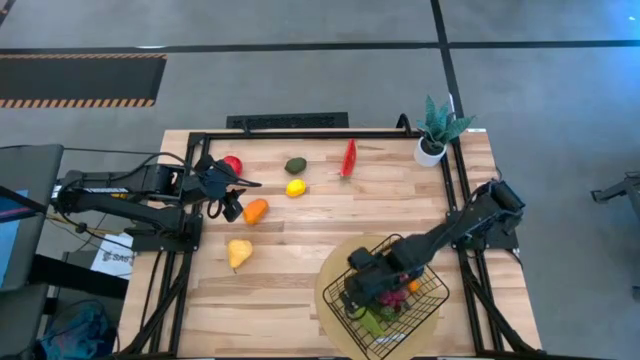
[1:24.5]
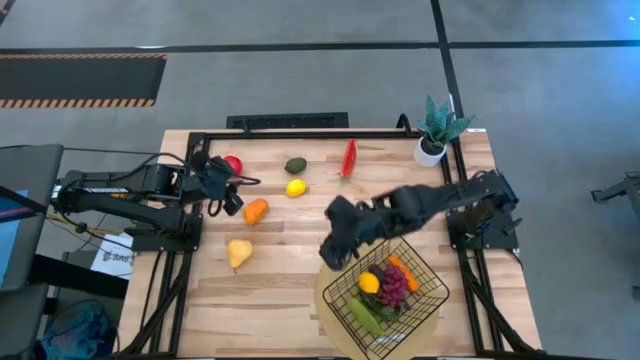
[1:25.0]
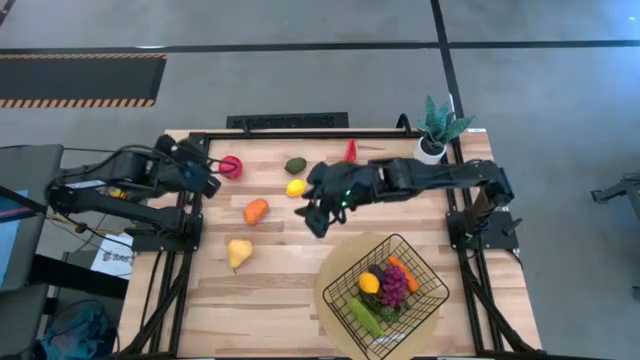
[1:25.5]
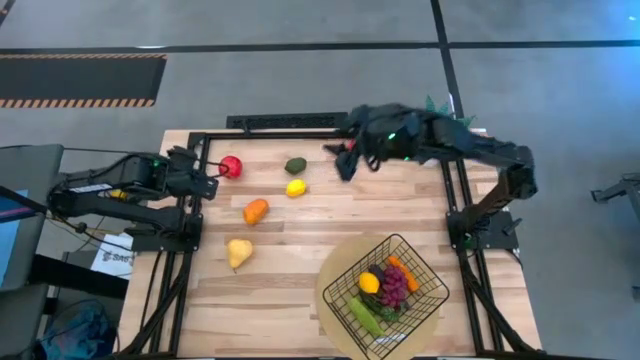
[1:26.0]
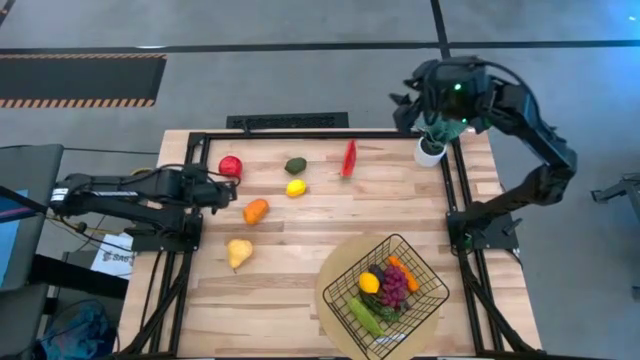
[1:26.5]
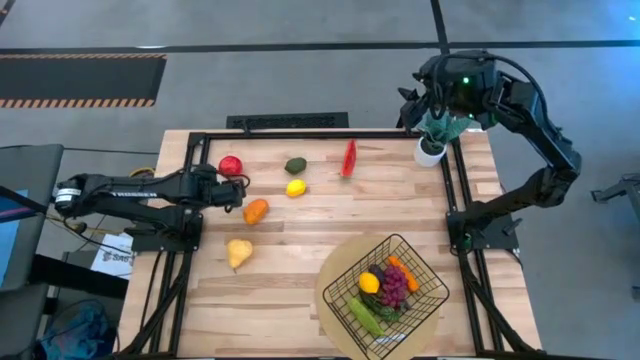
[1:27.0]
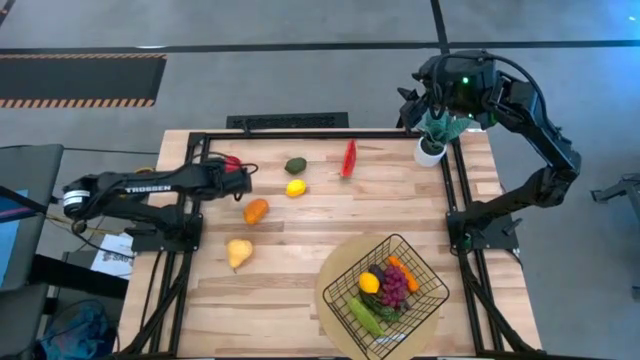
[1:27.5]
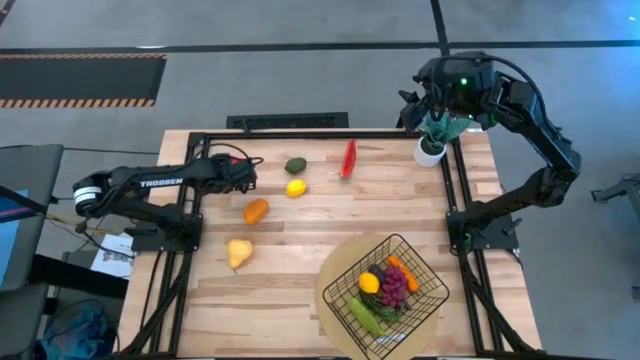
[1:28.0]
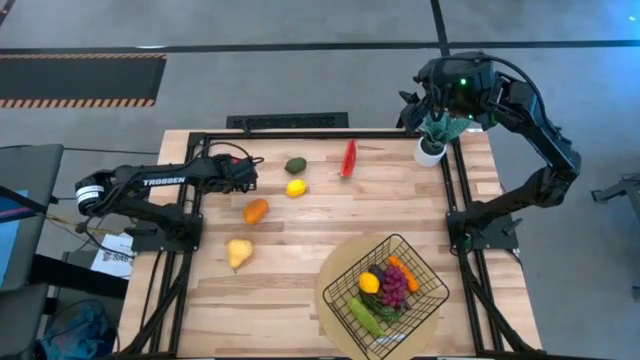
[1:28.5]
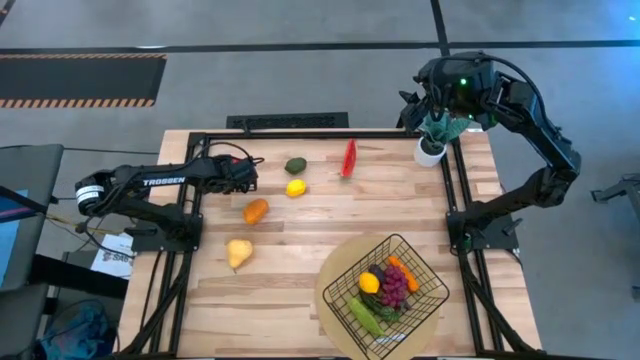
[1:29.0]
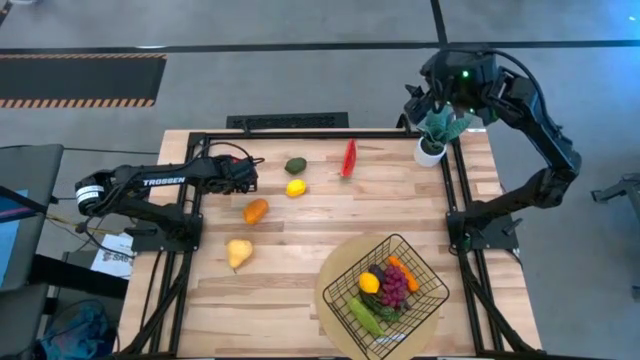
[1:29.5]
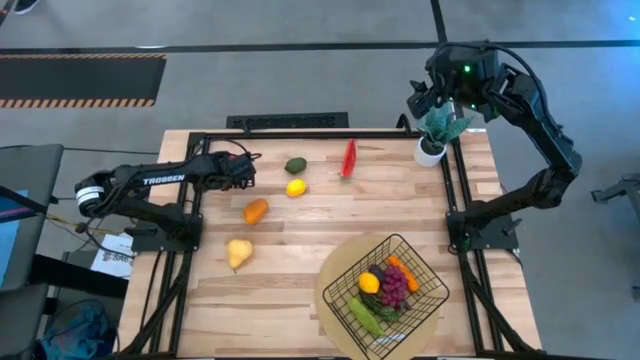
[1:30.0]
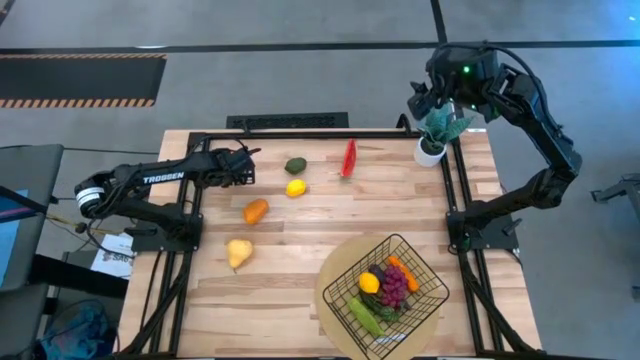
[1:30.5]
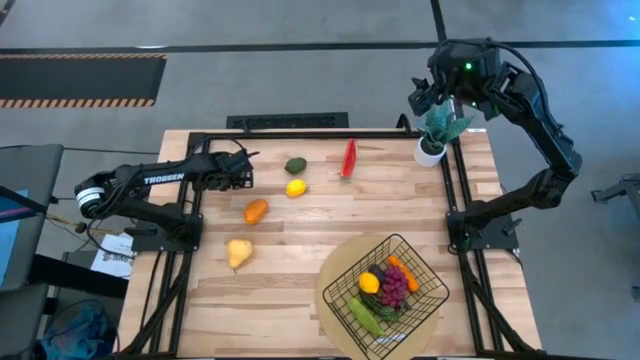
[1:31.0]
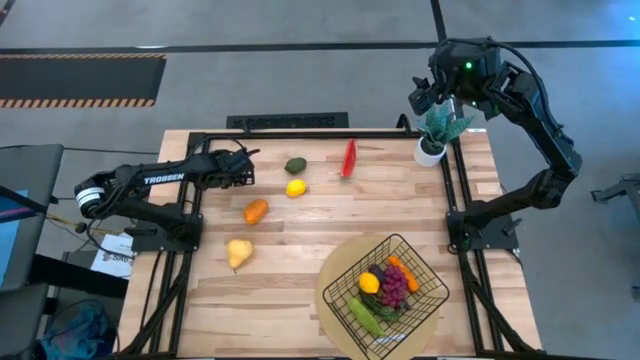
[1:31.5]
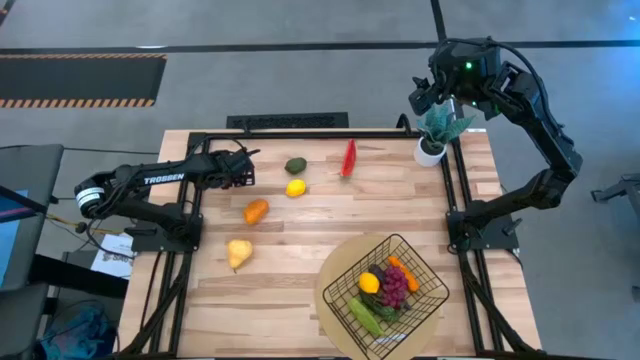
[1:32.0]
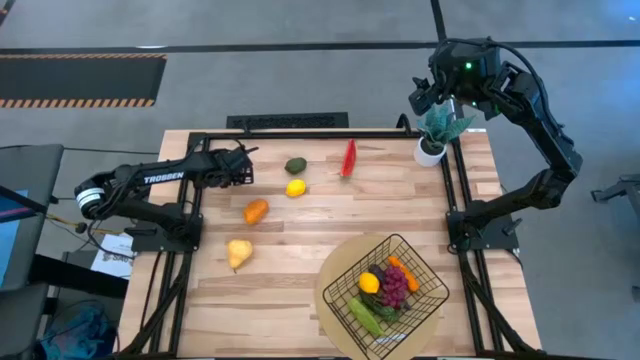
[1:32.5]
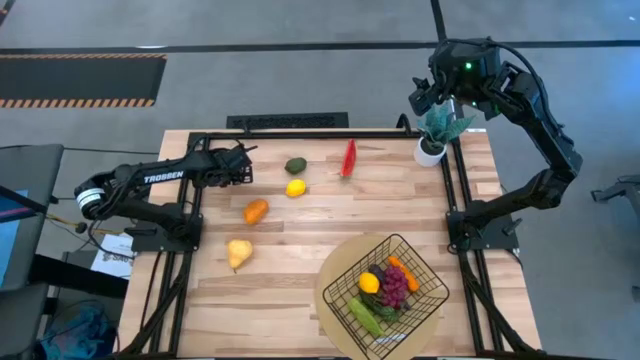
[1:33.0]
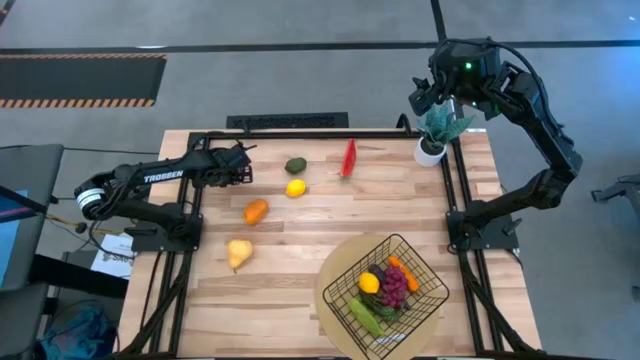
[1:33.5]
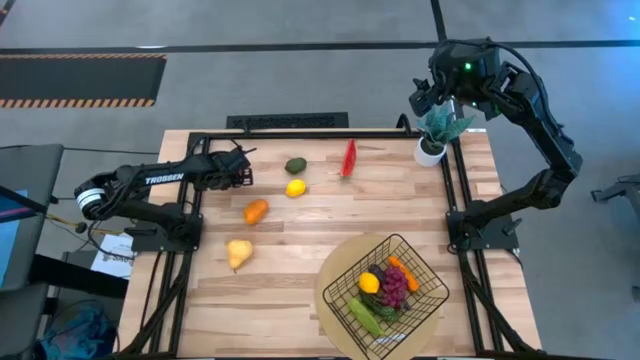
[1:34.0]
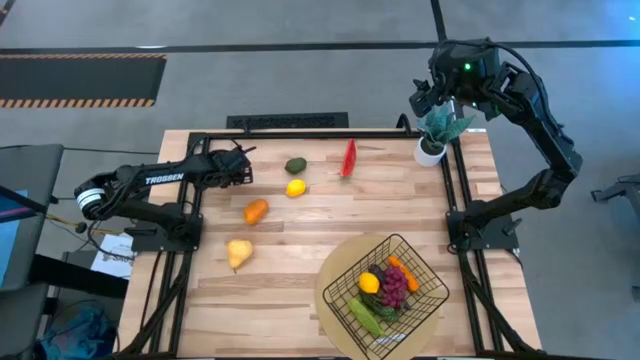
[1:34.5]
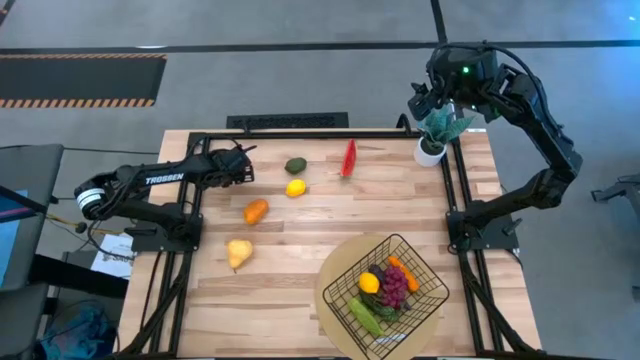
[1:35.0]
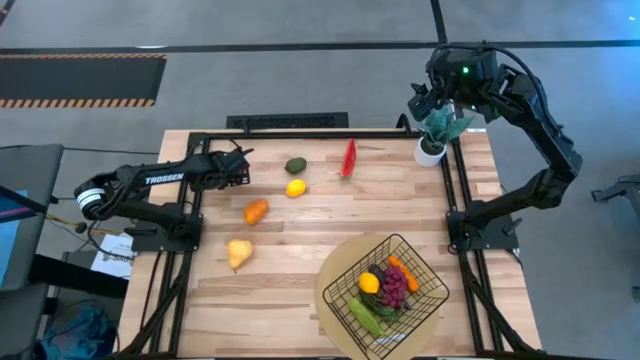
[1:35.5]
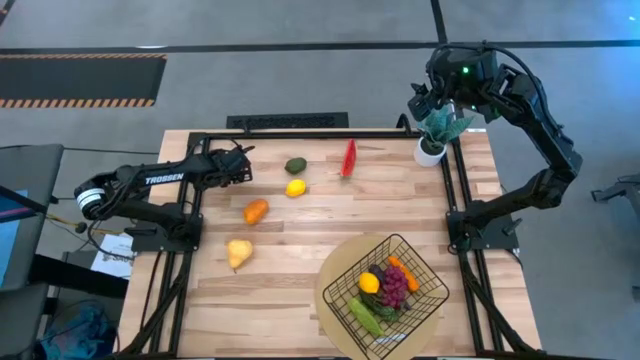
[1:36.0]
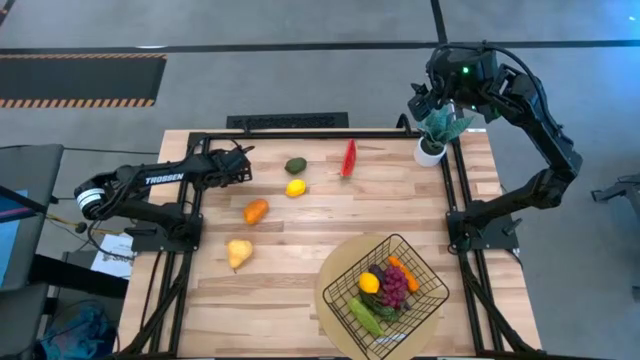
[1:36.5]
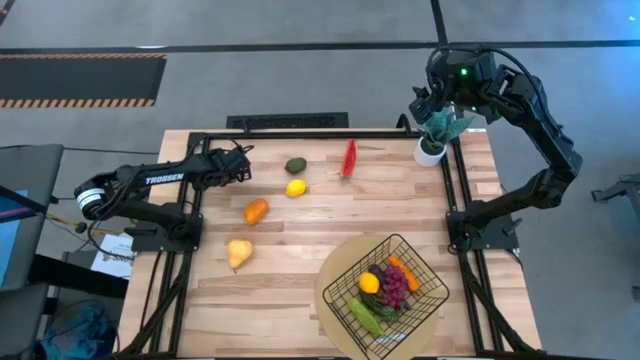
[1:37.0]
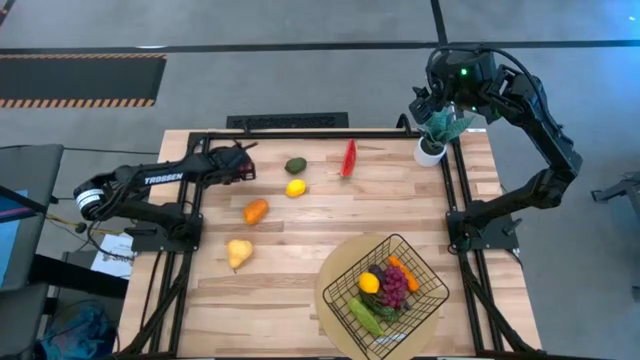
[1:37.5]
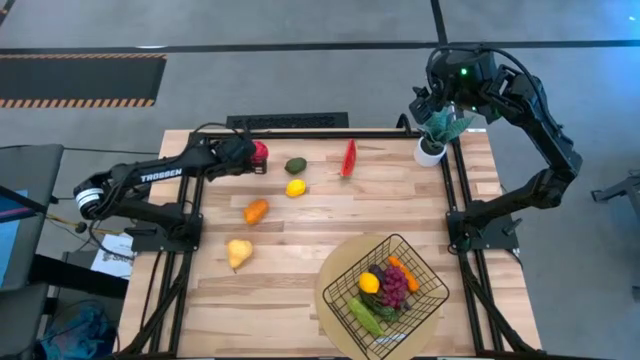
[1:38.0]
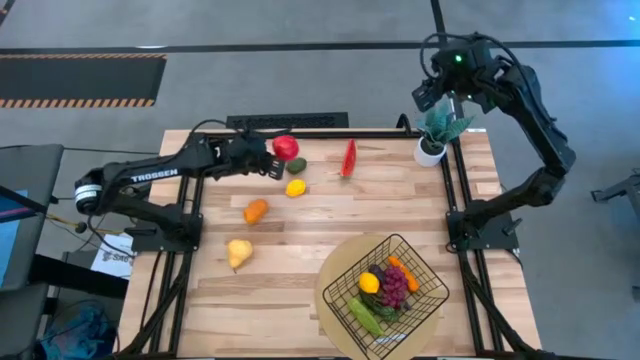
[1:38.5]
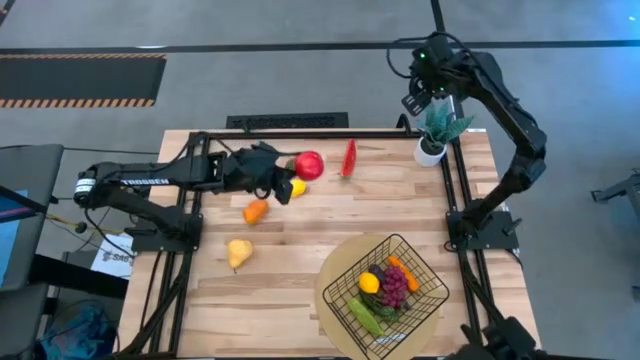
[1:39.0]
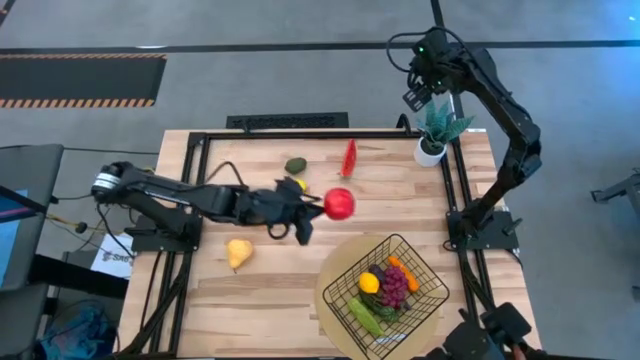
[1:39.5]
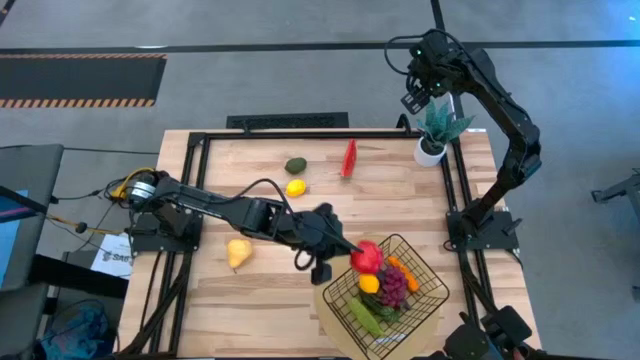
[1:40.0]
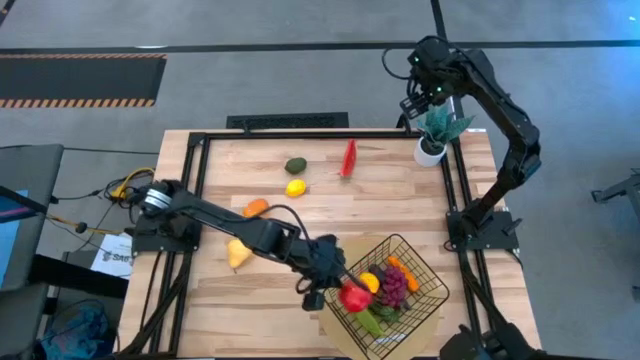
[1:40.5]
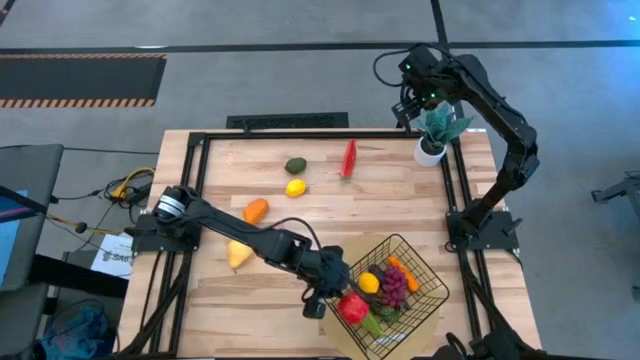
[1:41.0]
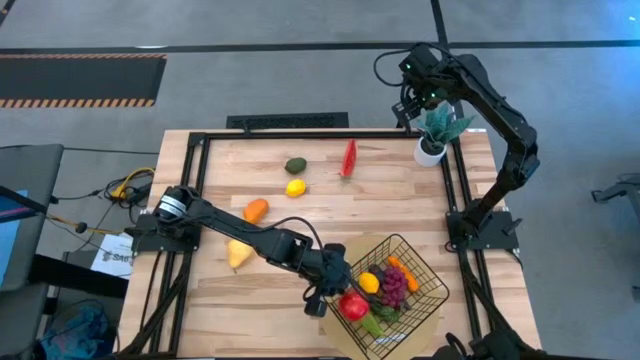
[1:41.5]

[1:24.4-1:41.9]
Task: Build produce basket
Put the apple into the mesh basket
